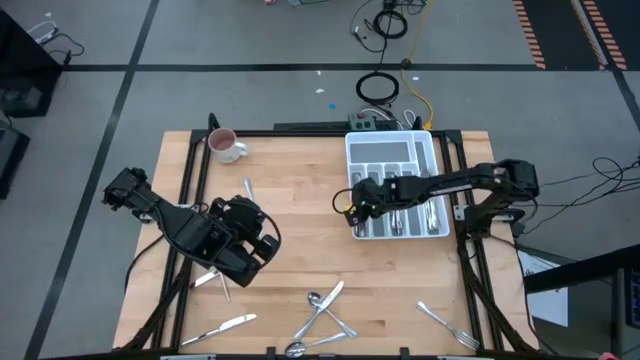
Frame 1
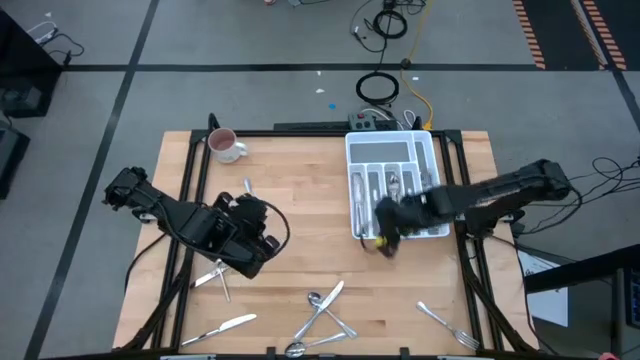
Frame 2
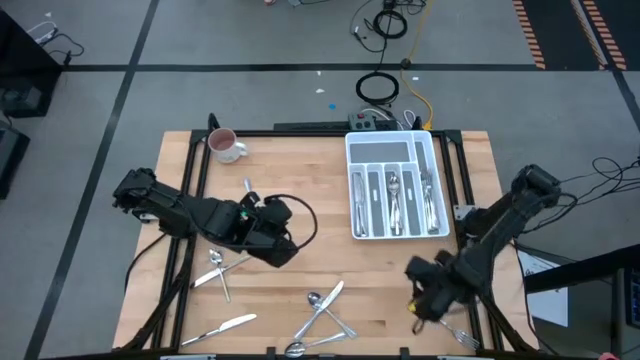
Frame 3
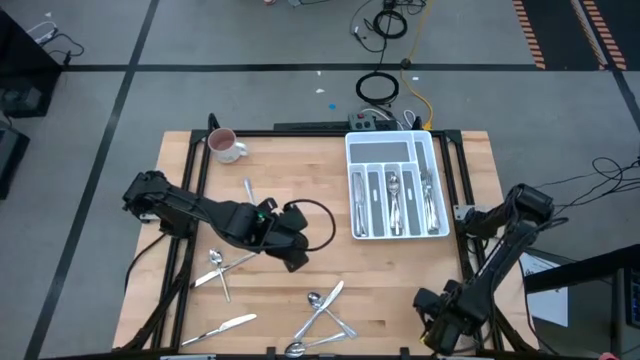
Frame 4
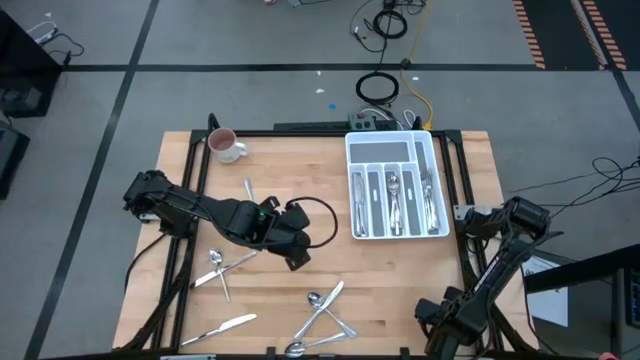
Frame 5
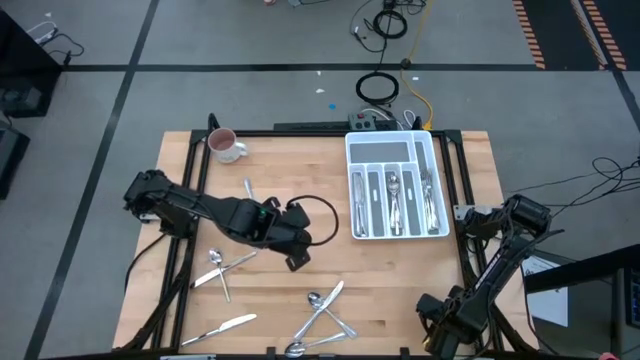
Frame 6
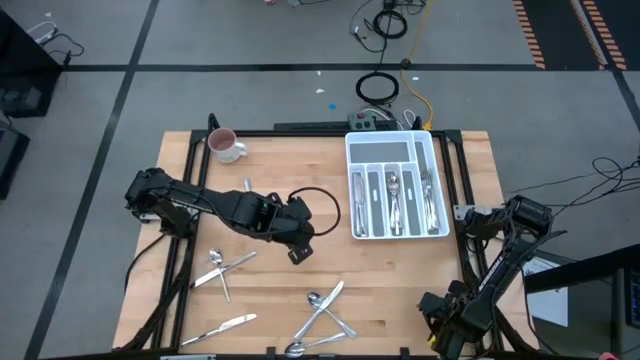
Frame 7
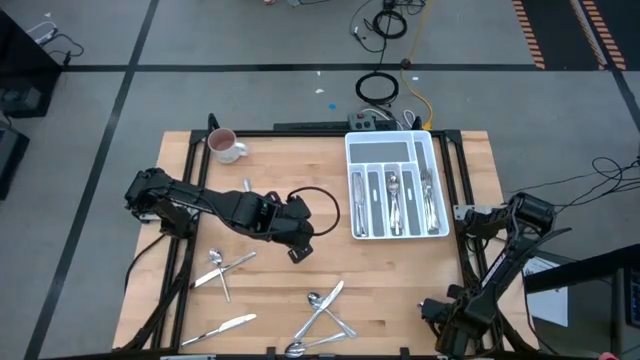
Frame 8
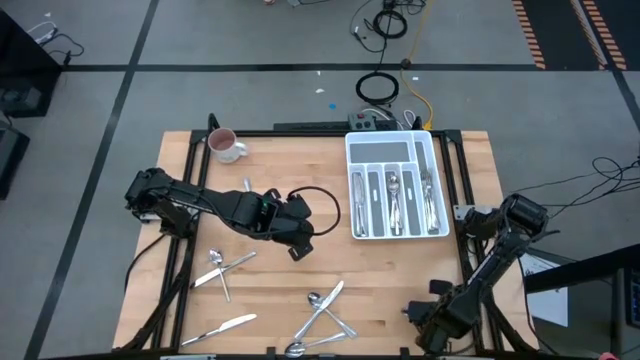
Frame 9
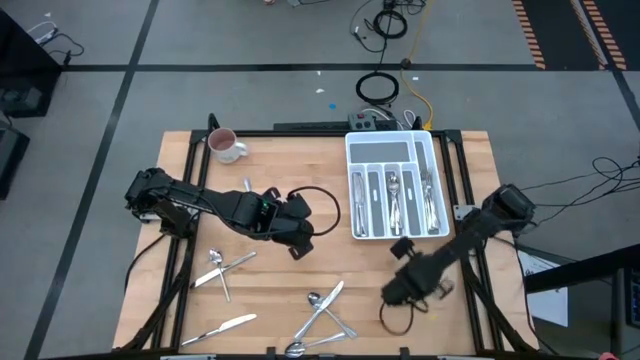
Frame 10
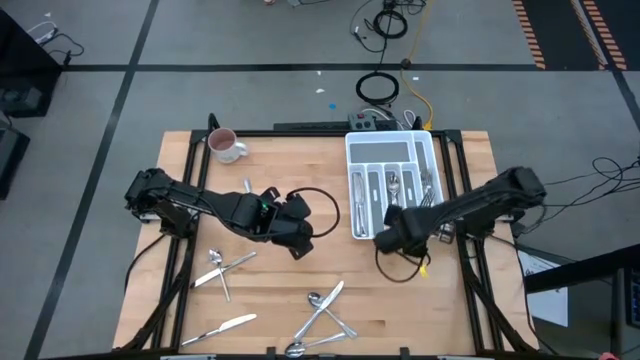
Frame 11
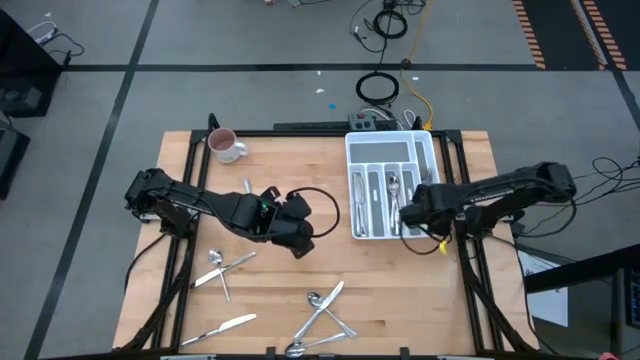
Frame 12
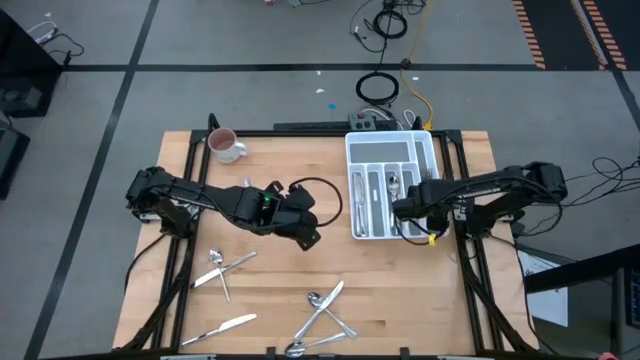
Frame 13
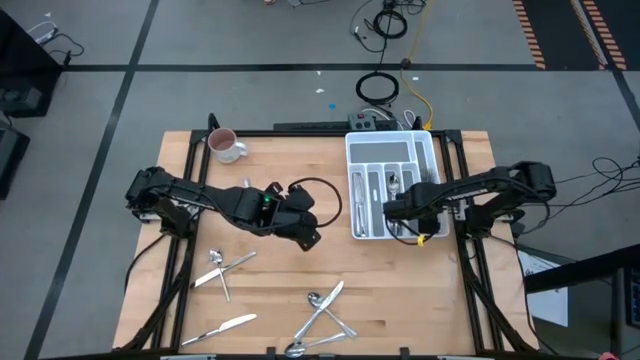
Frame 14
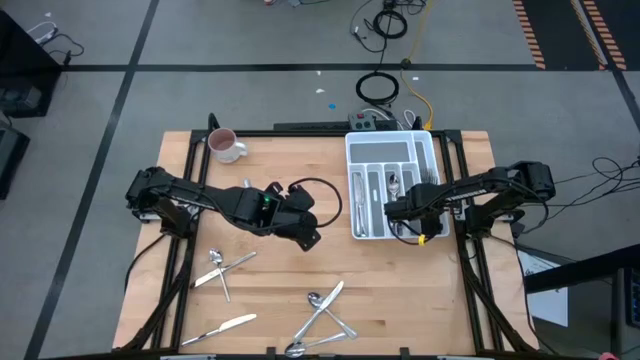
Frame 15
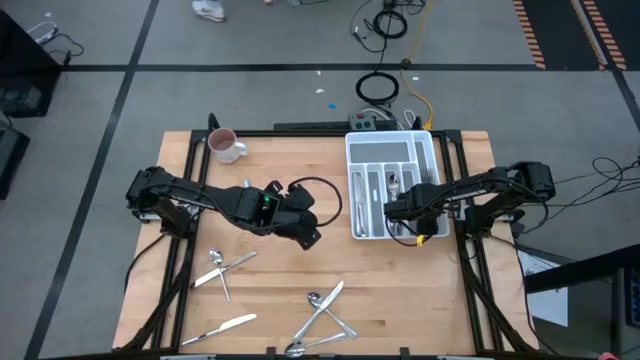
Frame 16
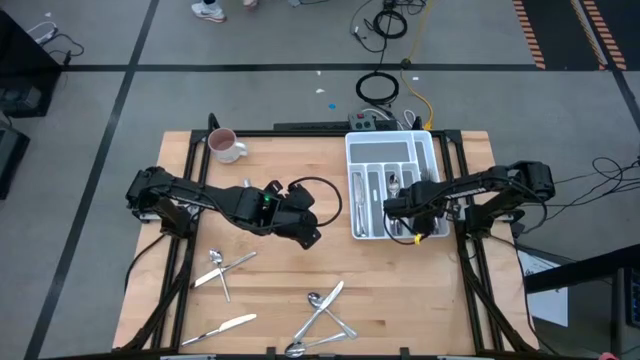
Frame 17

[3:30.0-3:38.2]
Task: Sort silverware
Put the fork in the right section of the silverware tray

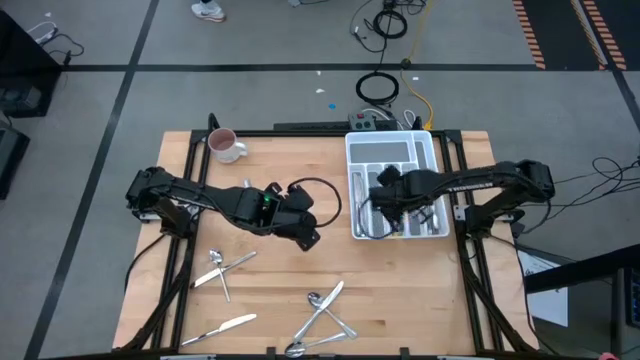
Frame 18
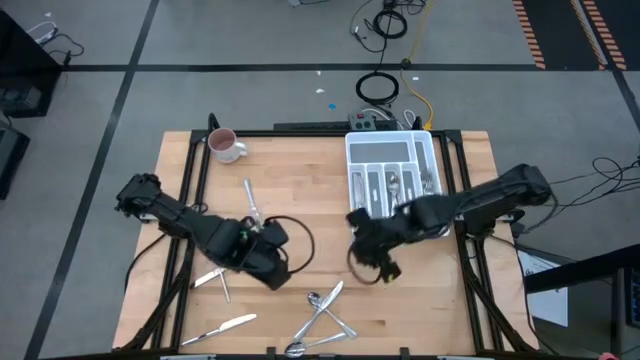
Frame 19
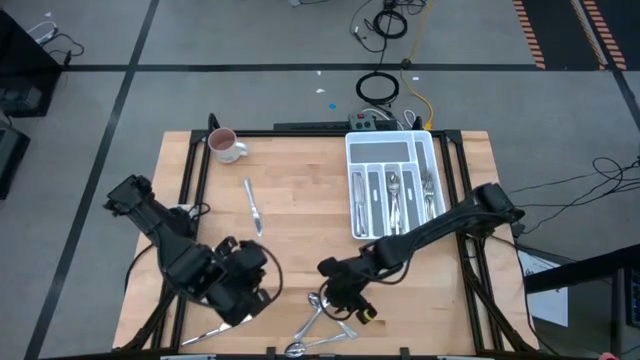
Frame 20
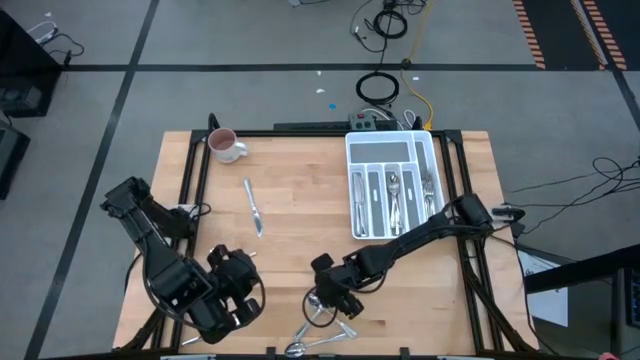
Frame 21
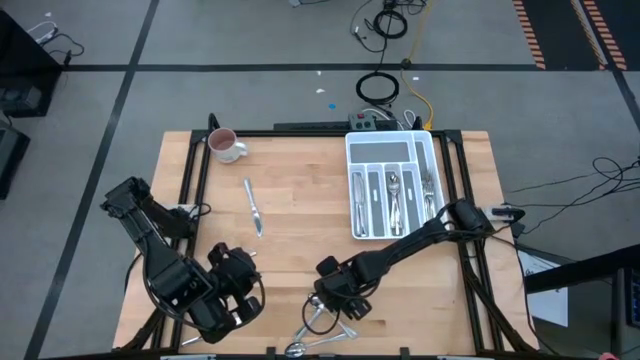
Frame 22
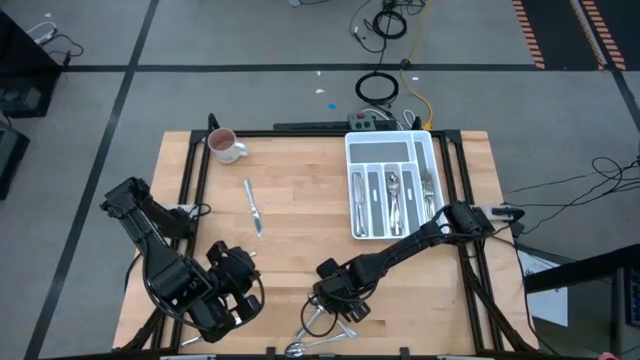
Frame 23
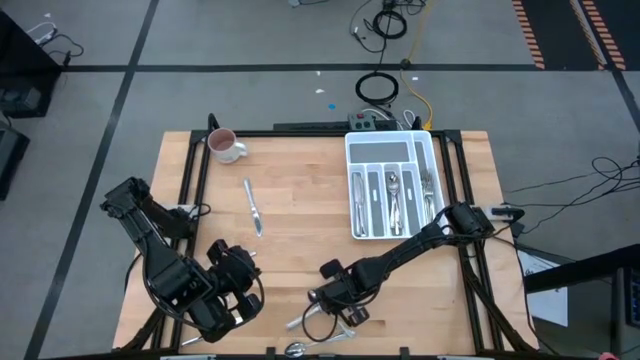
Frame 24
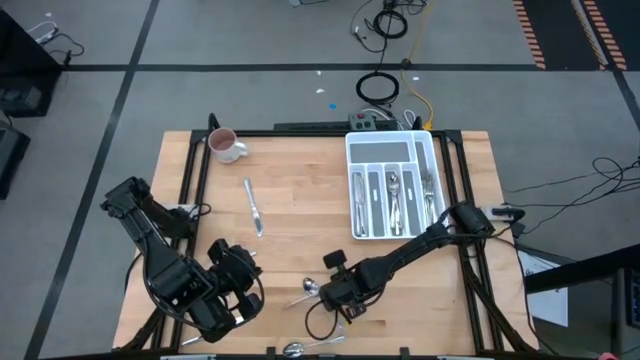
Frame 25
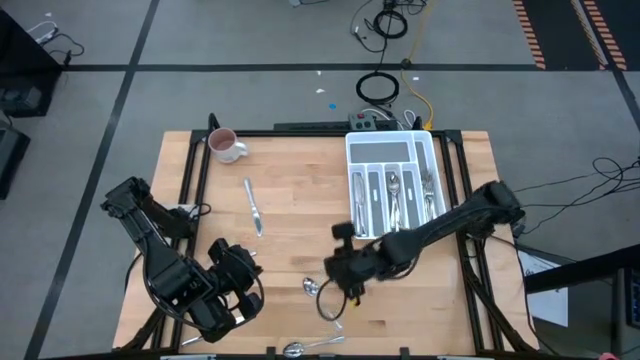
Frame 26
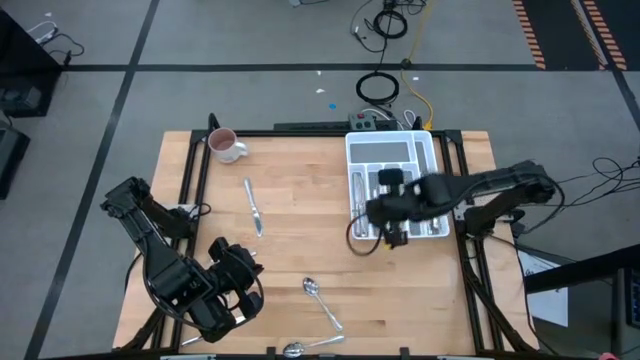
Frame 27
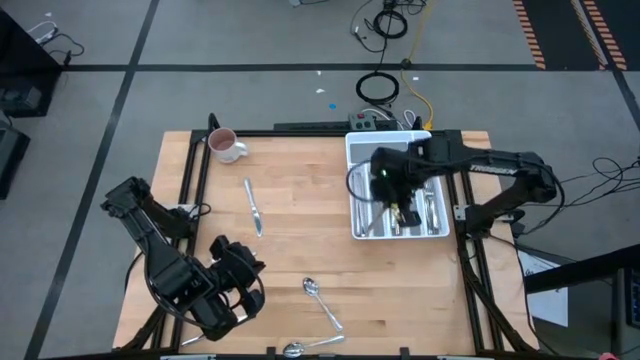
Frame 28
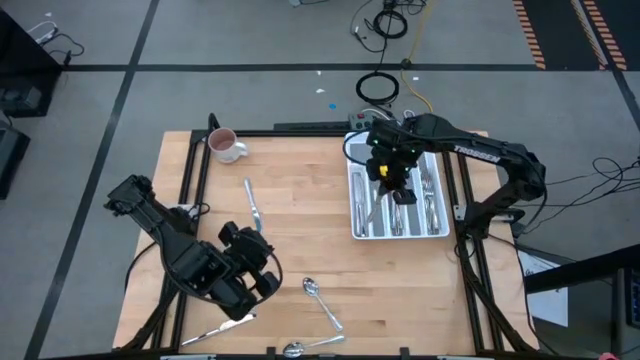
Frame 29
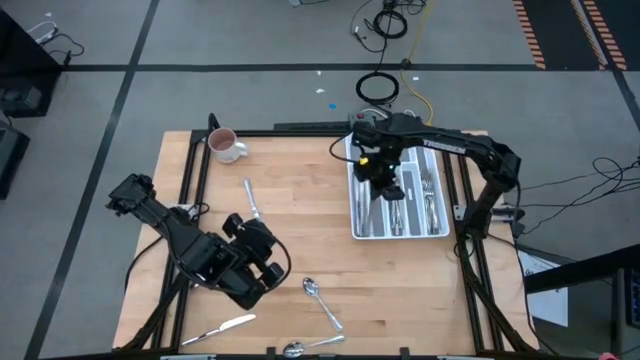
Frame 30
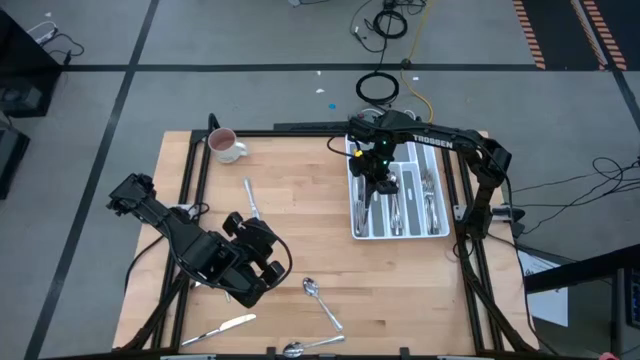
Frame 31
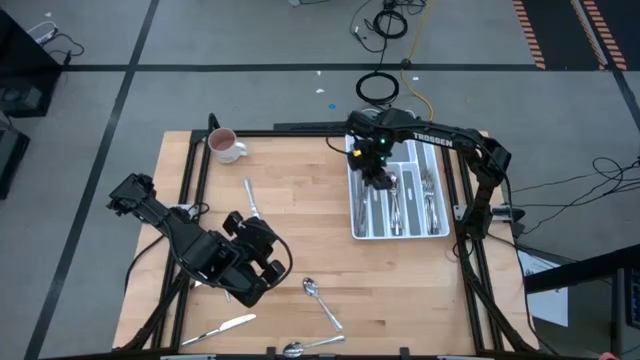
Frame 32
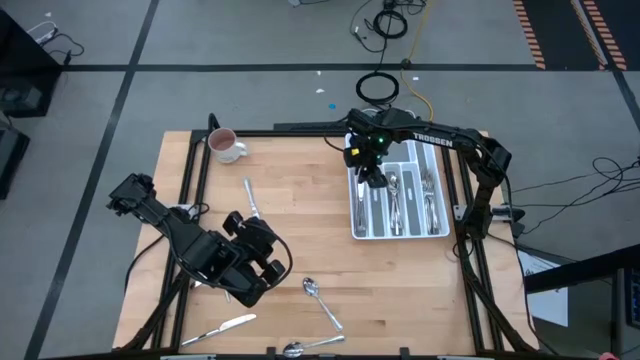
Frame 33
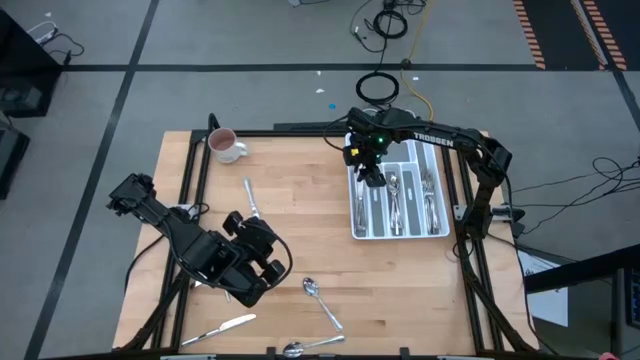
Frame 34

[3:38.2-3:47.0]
Put the bottom right knife in the left section of the silverware tray

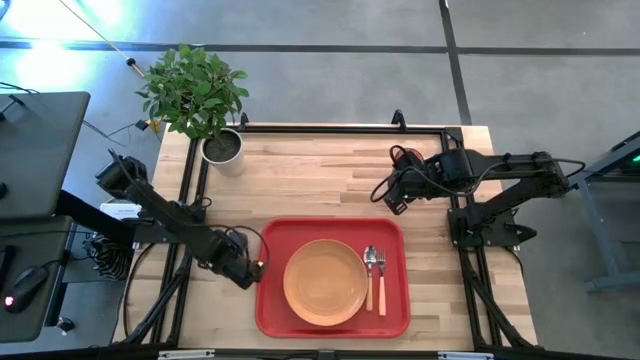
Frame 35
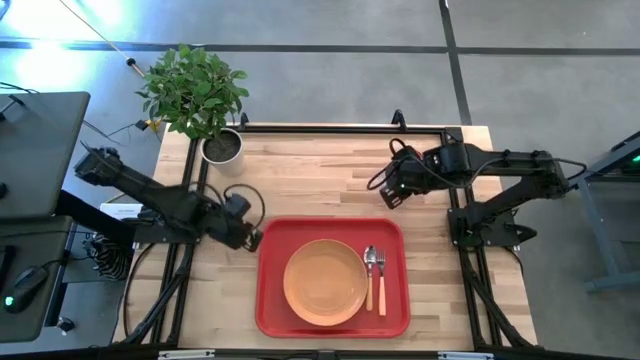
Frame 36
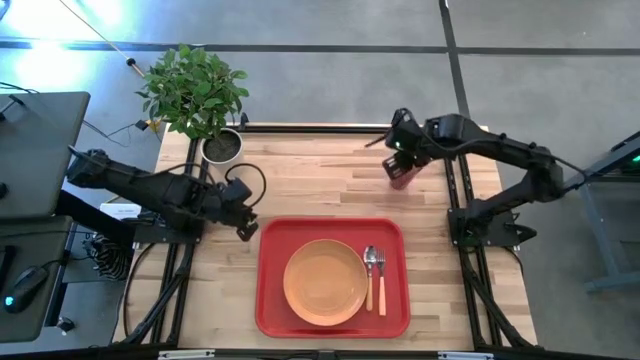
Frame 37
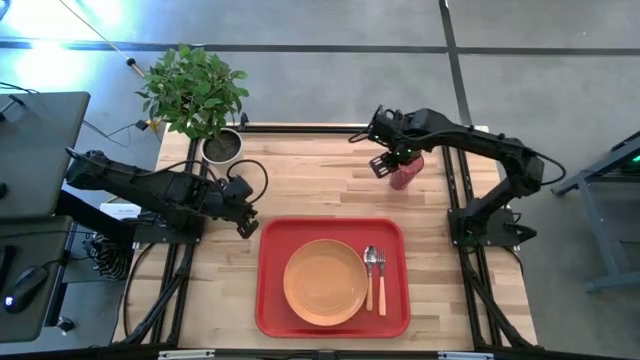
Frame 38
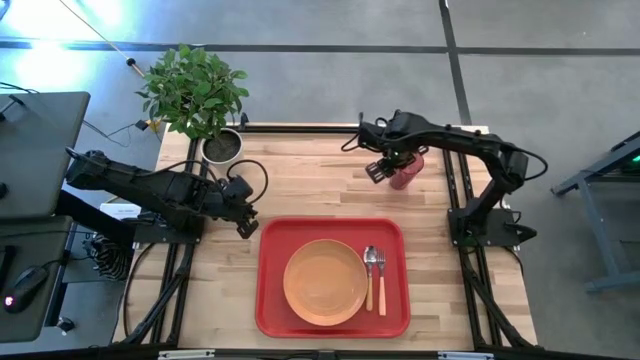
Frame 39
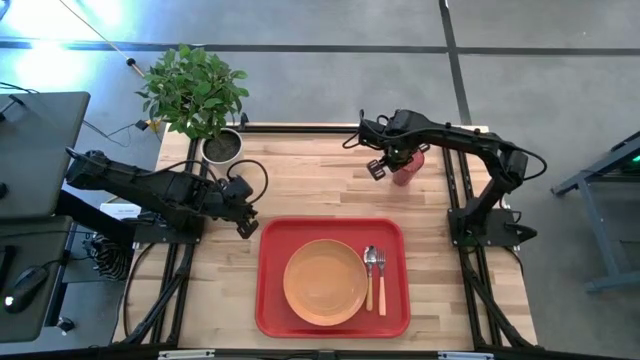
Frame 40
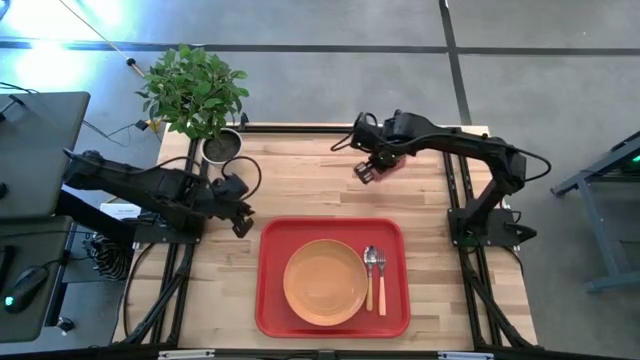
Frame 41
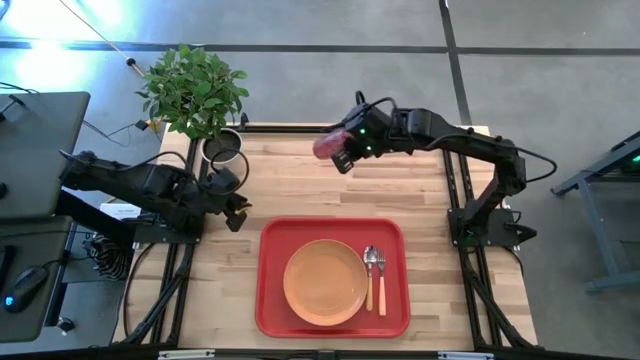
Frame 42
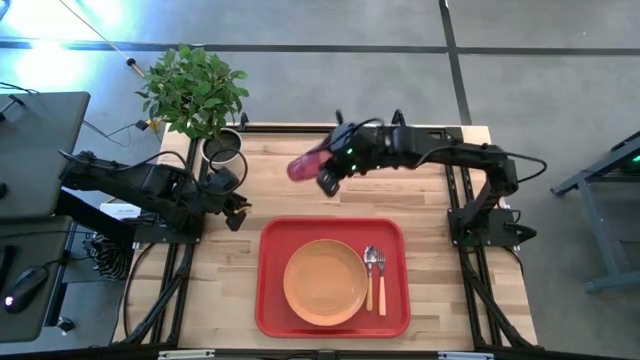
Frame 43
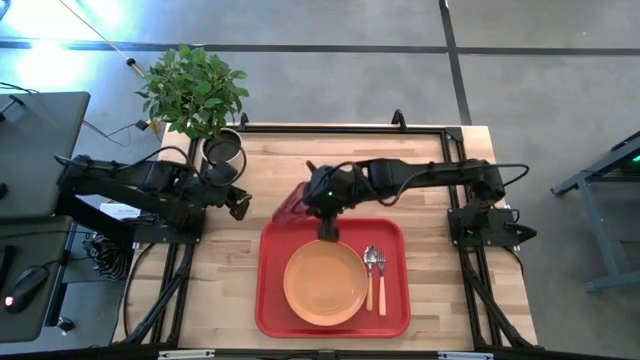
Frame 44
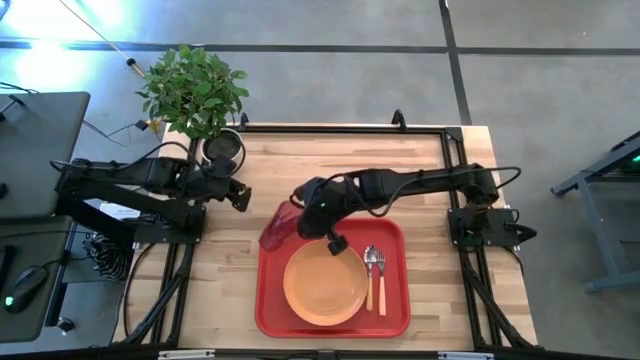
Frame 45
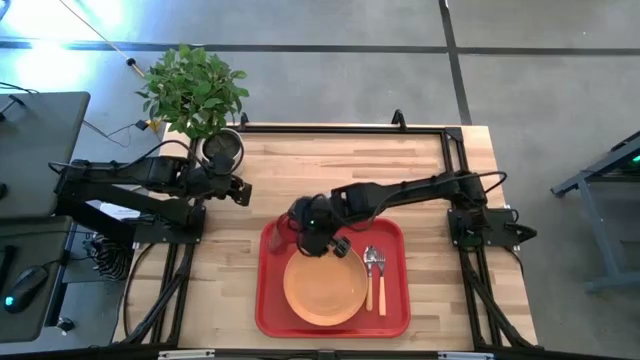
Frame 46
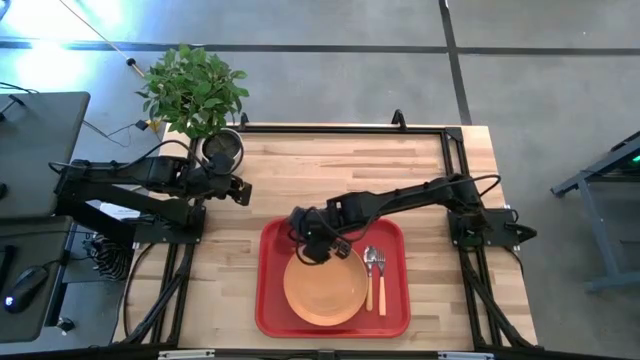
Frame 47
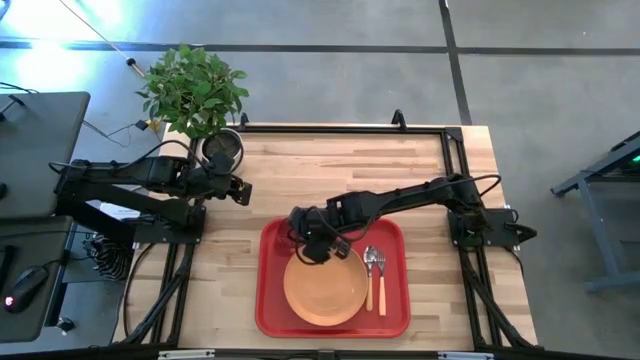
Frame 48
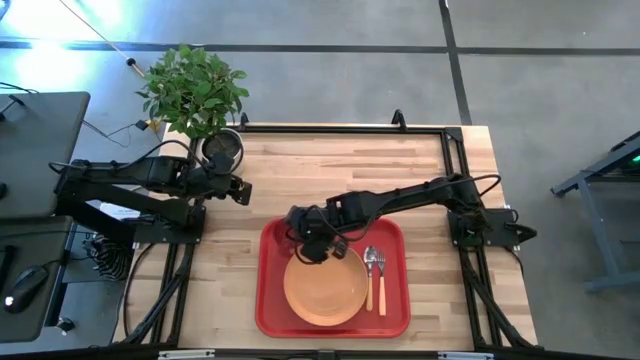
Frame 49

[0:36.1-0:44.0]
Task: Pick and place plate/cup/fork/spoon on tray
Put the red cup on the top left corner of the orange tray
